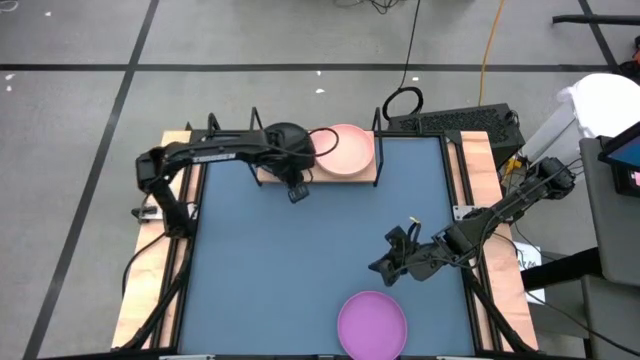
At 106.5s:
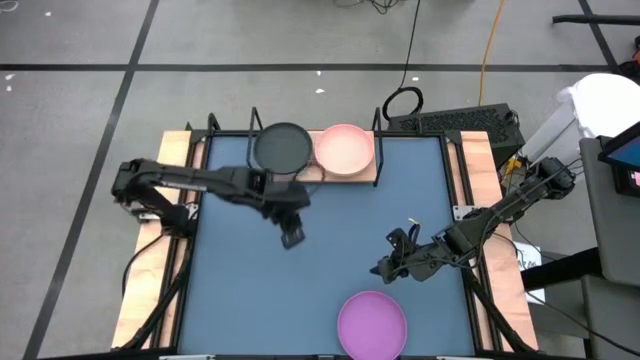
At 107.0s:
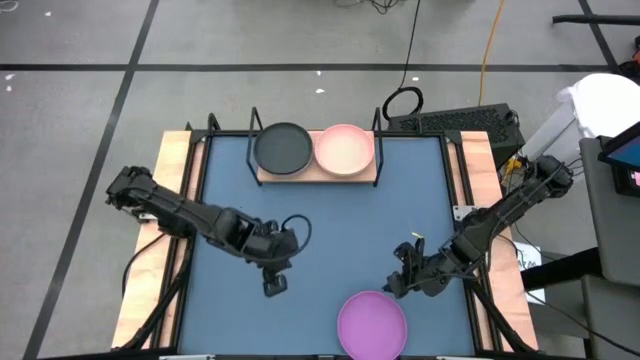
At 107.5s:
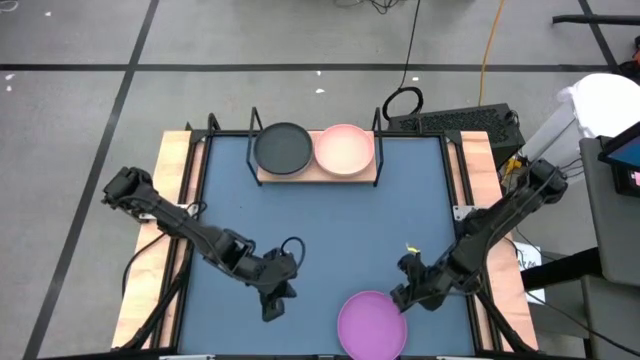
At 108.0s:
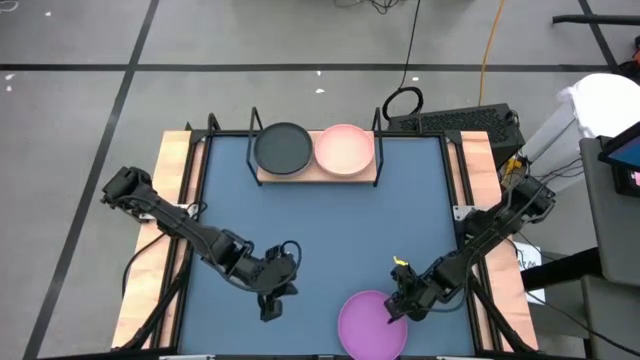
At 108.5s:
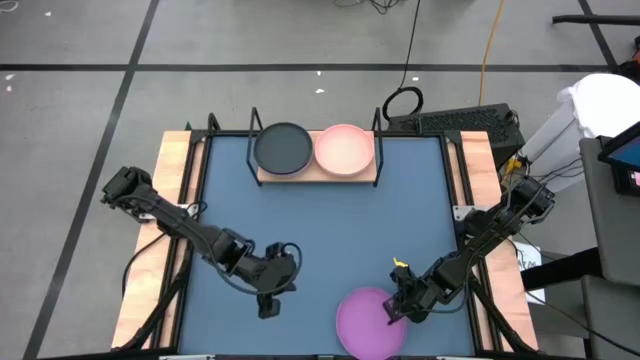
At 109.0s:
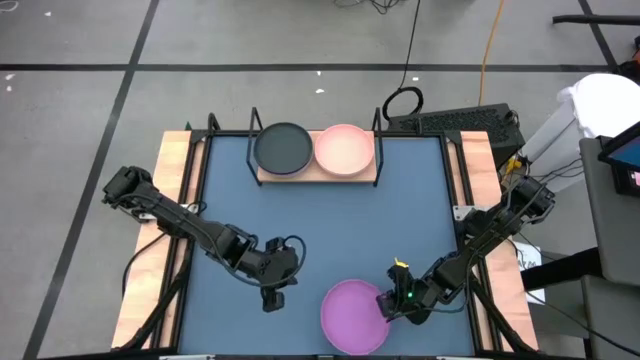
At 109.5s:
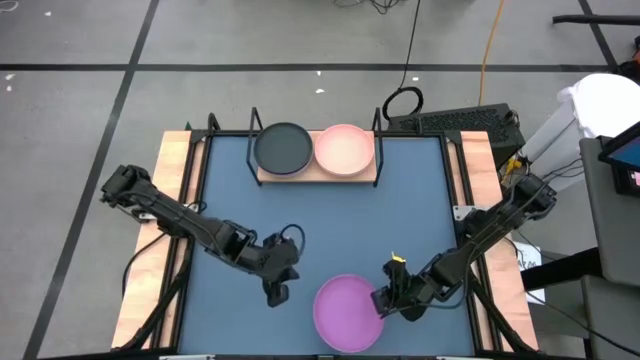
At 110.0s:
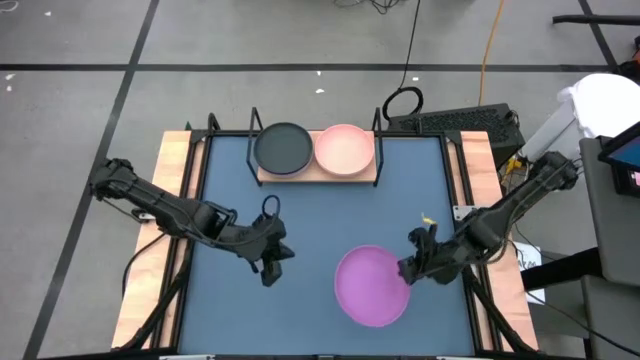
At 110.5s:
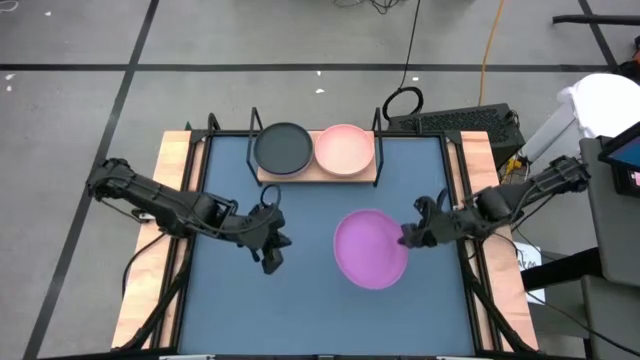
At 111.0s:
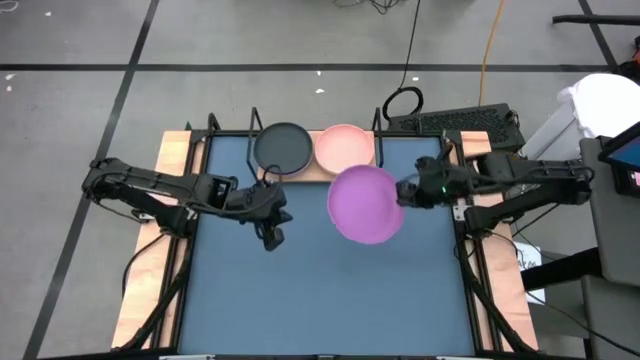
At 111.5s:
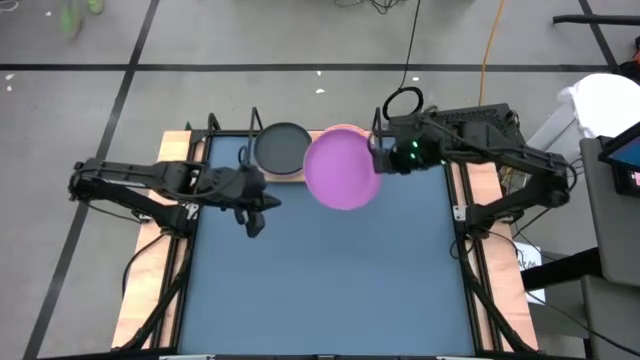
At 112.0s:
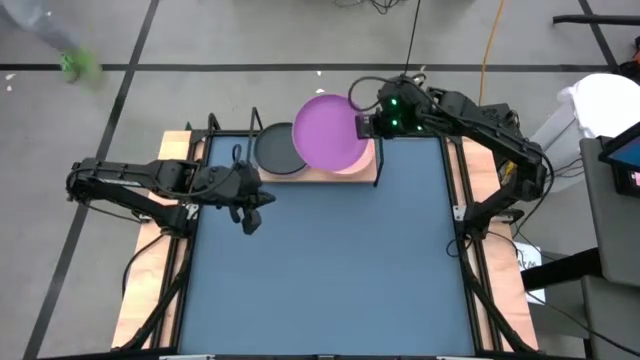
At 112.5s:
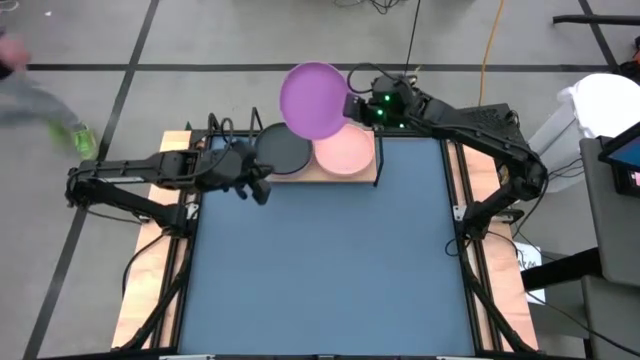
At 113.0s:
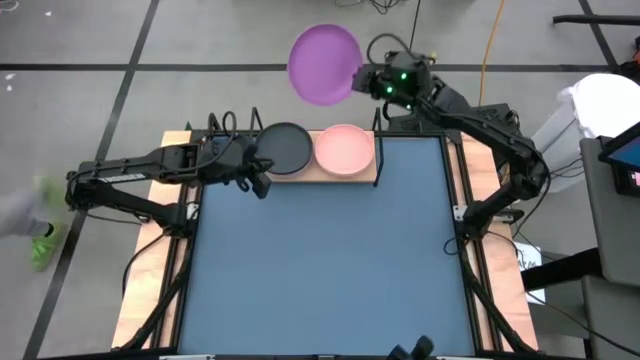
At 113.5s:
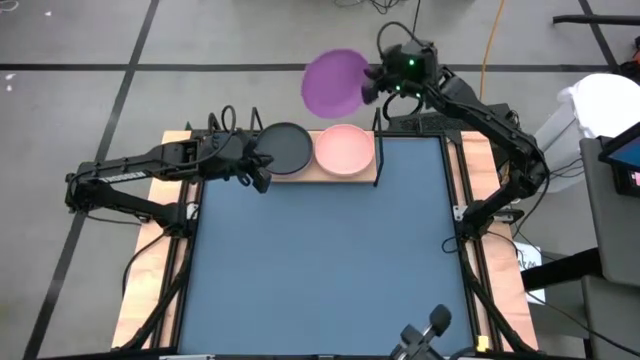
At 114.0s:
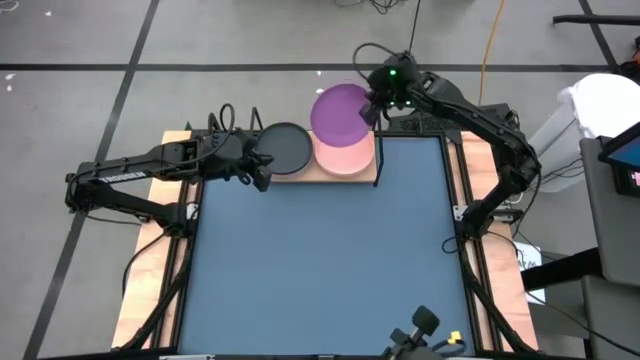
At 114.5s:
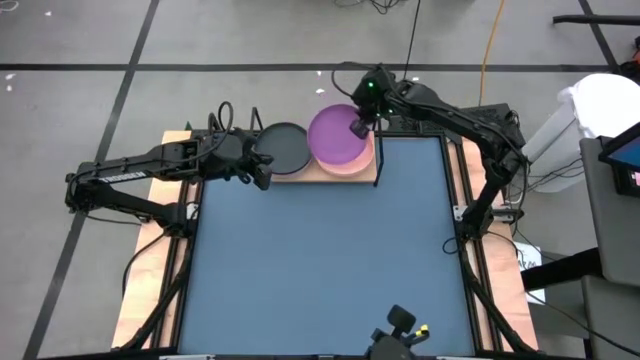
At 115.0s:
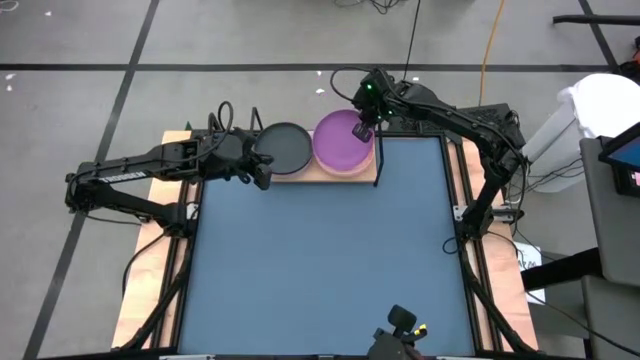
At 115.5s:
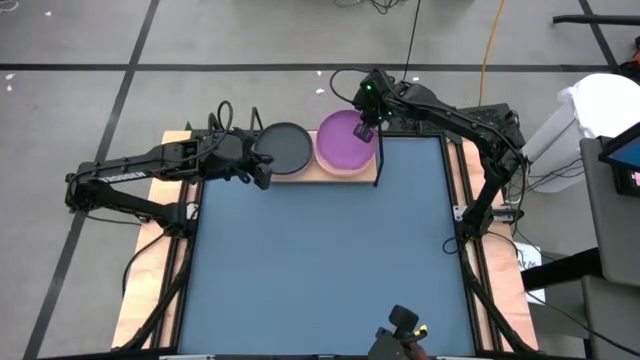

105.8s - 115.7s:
Task: Place and stack plates onto a shelf
Stack the purple plate on top of the pink plate

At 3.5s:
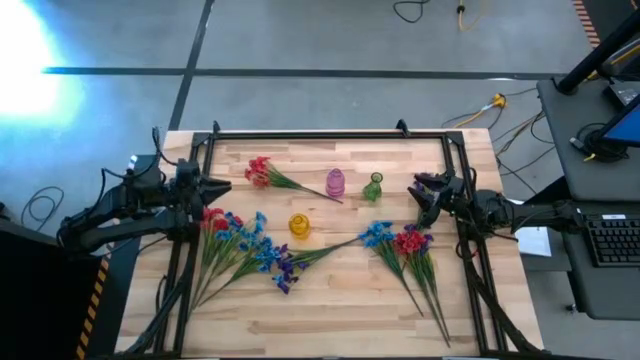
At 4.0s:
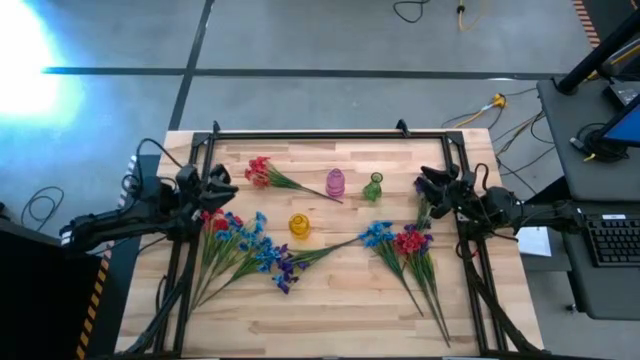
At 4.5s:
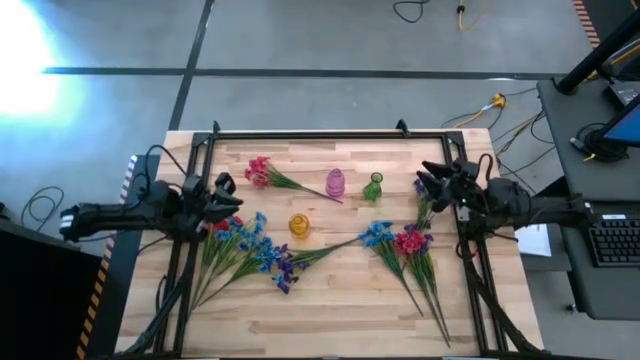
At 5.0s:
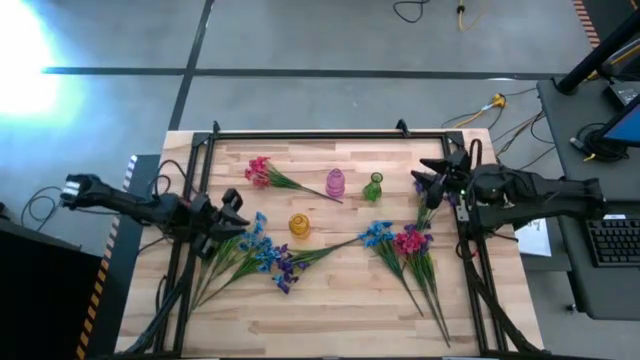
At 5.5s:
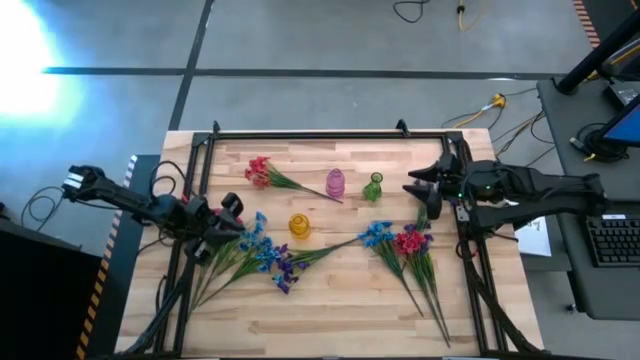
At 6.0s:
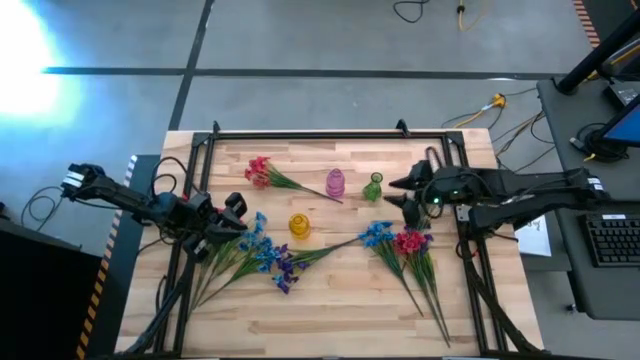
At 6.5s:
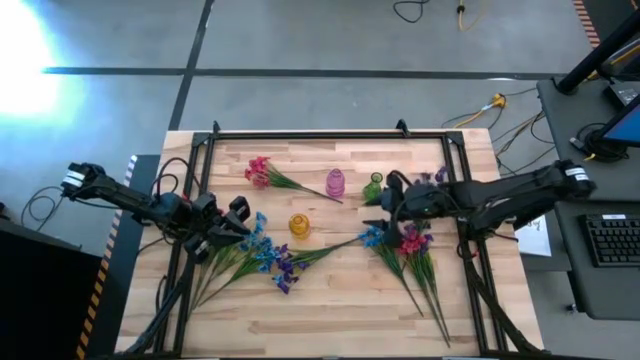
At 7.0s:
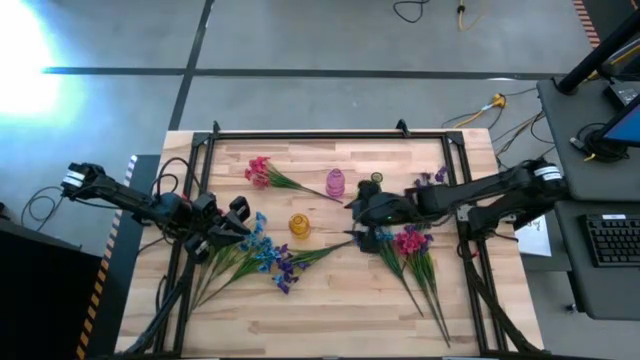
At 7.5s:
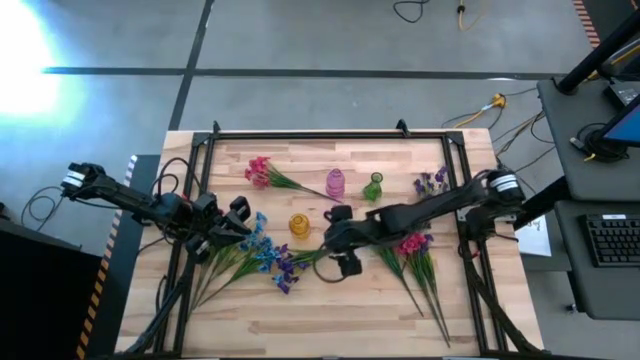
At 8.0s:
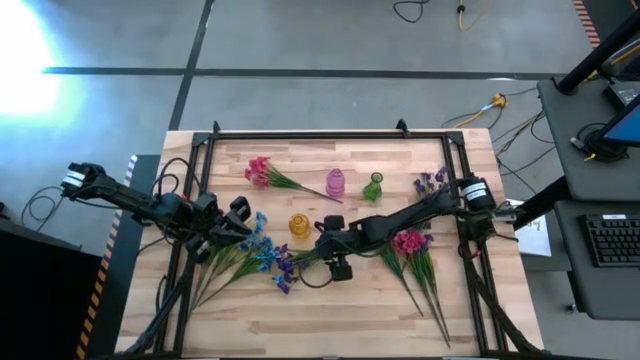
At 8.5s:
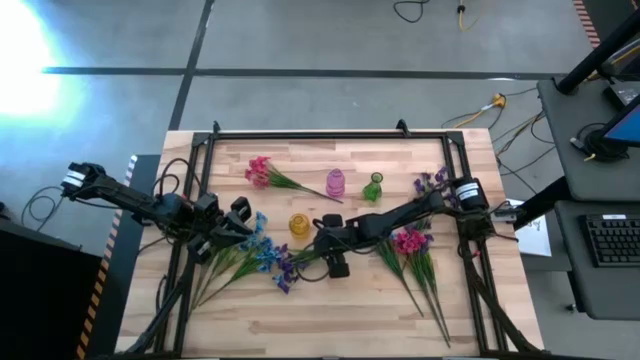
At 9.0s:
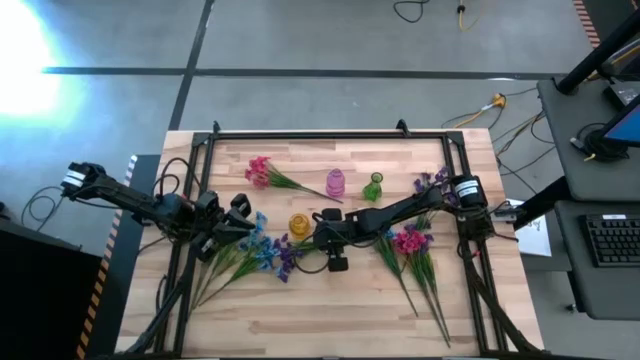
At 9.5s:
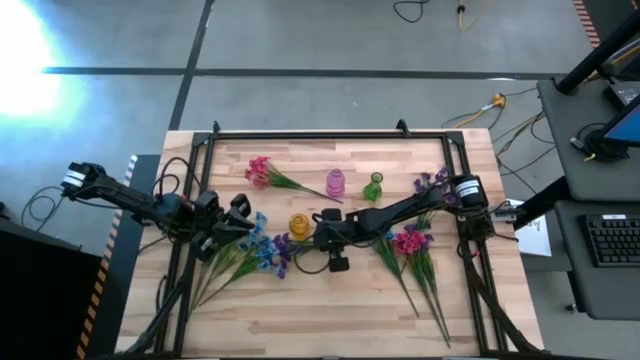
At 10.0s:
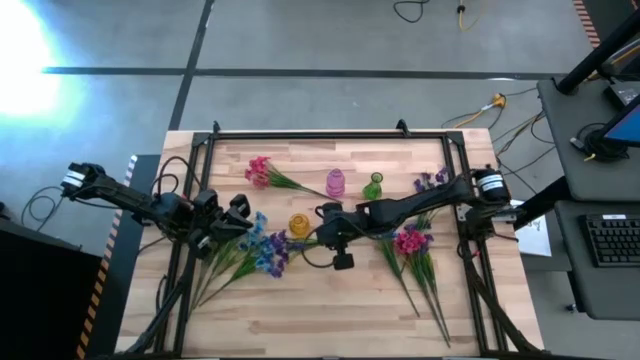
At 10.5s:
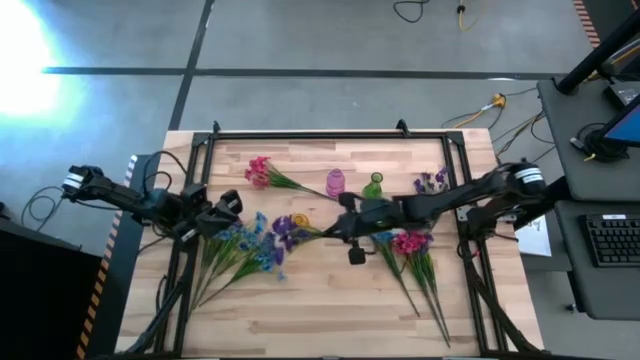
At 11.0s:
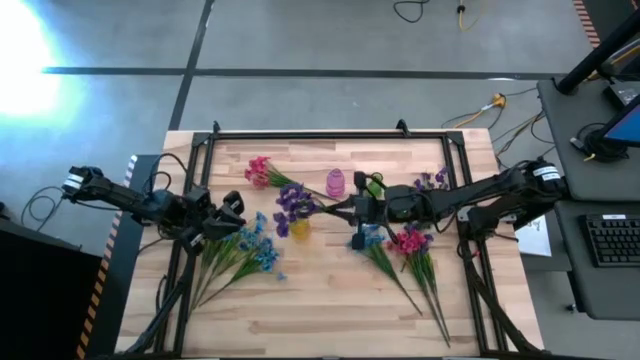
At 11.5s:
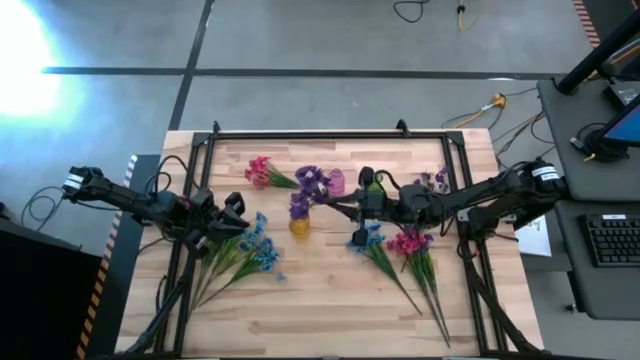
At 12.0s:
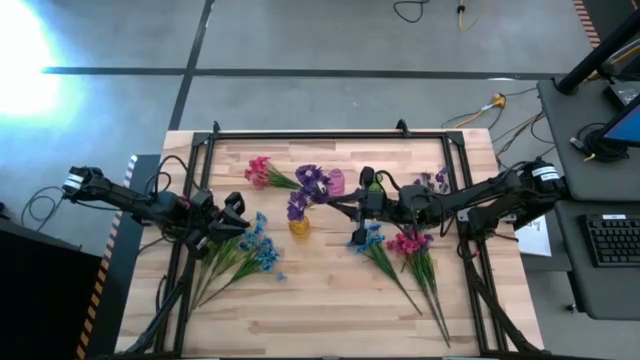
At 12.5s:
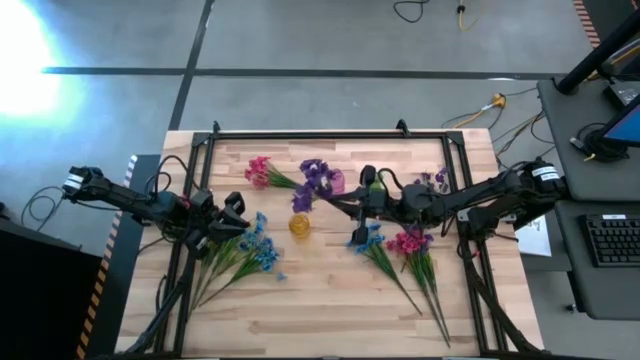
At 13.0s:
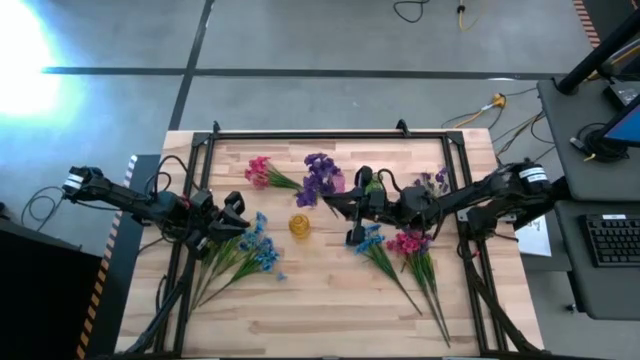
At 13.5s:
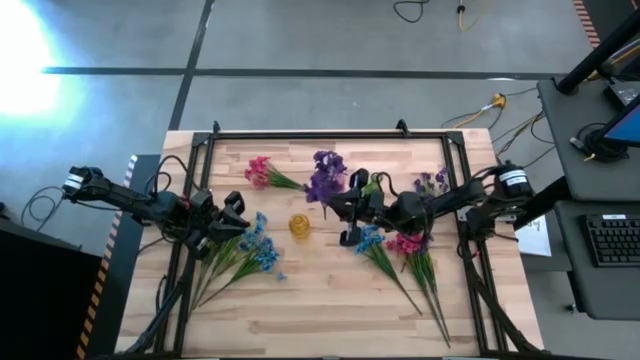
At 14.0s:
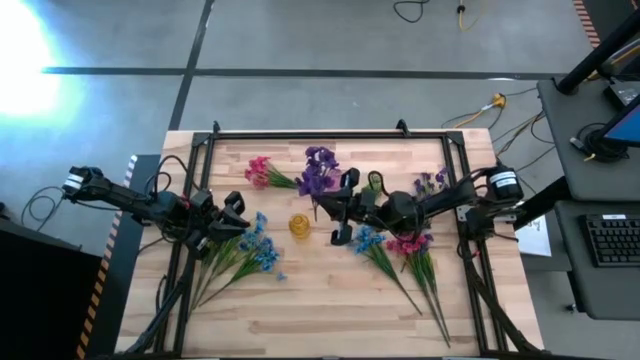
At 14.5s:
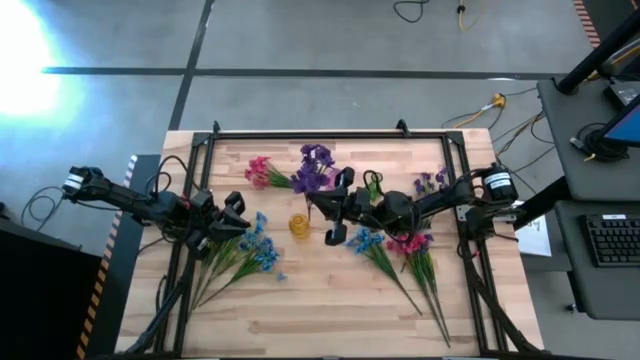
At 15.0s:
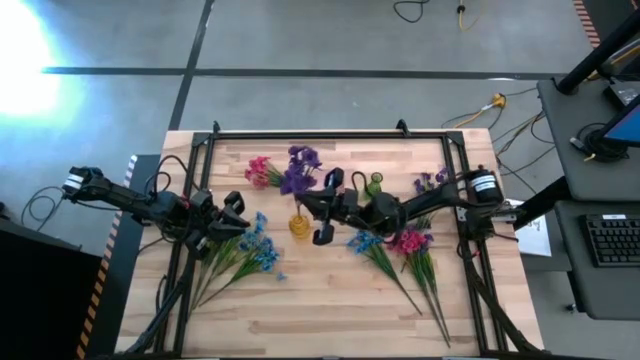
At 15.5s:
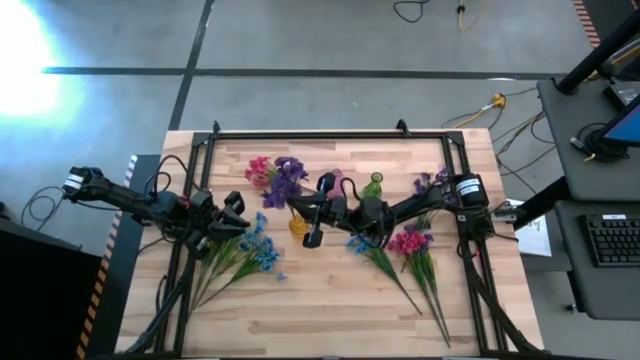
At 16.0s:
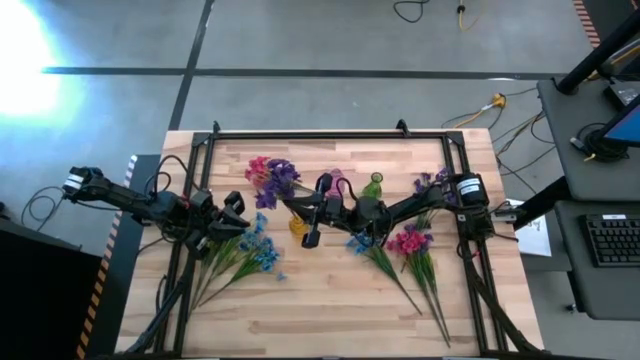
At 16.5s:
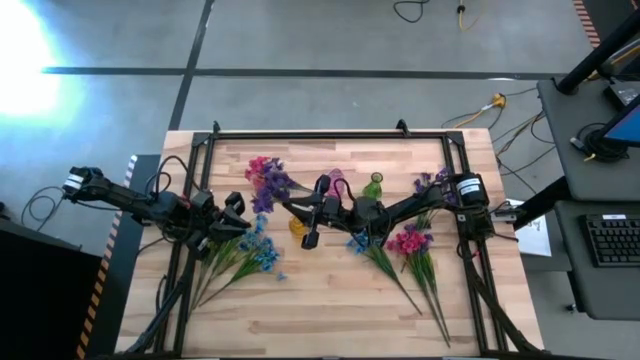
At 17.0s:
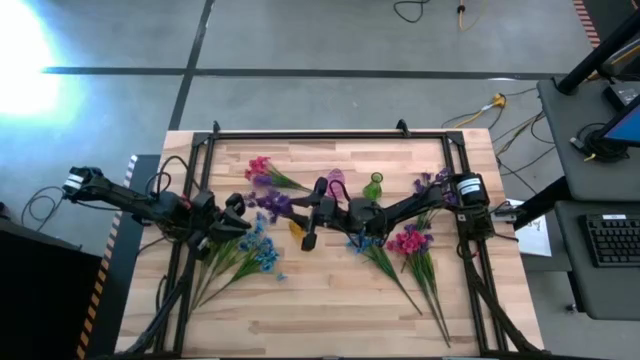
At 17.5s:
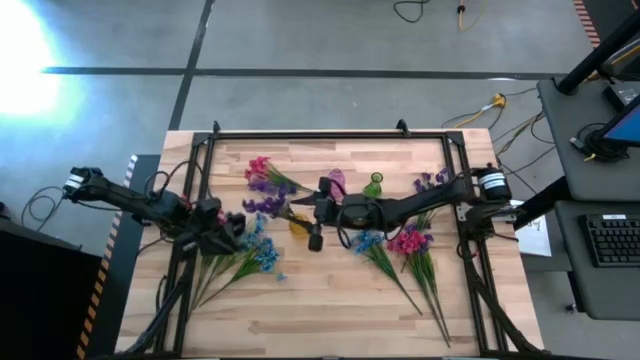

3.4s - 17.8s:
Task: Sort flowers into vase by color
Put the left violet flowers into the yellow vase
